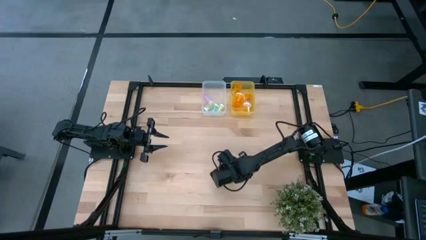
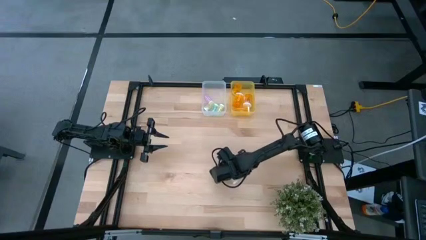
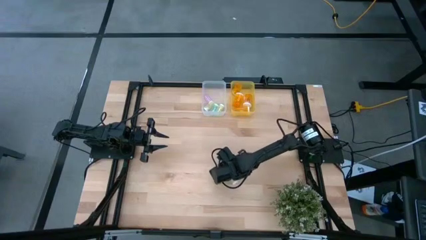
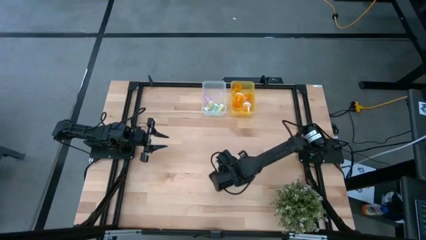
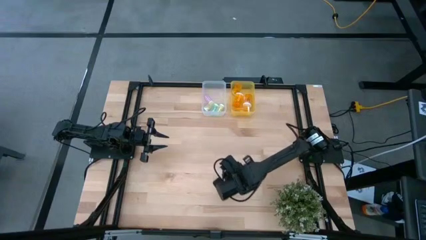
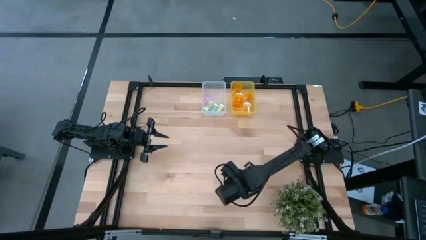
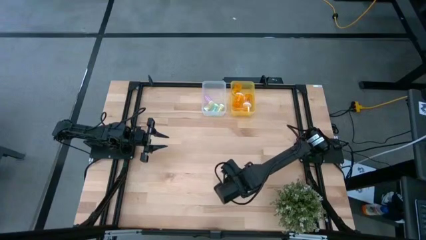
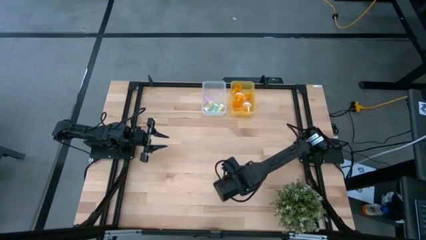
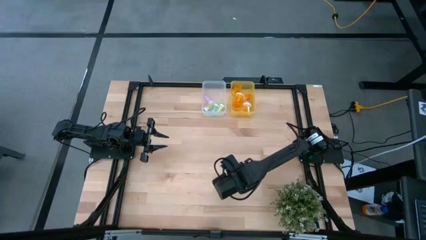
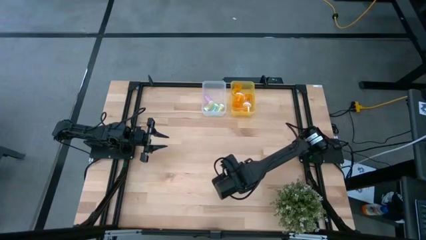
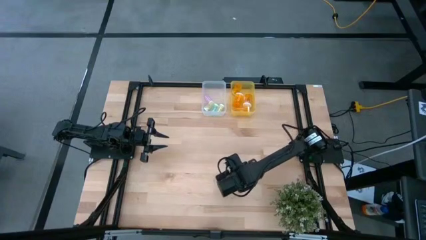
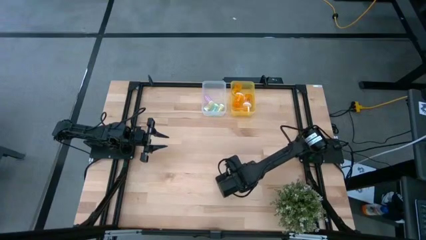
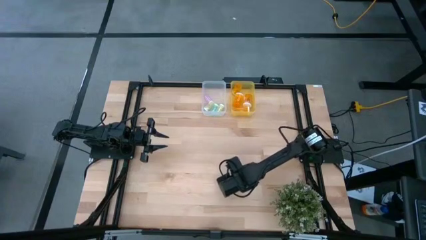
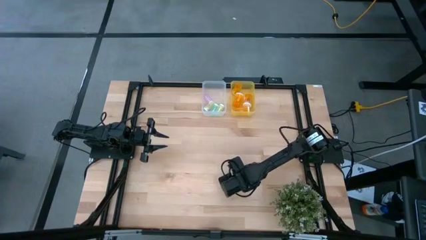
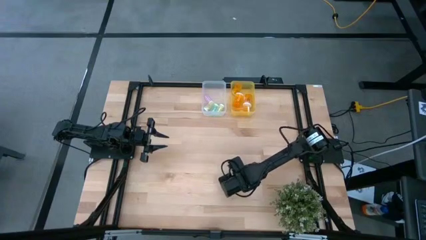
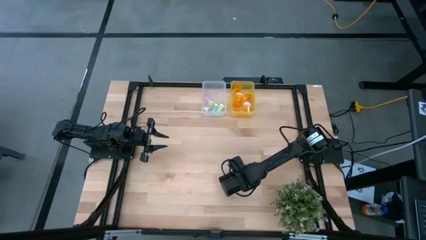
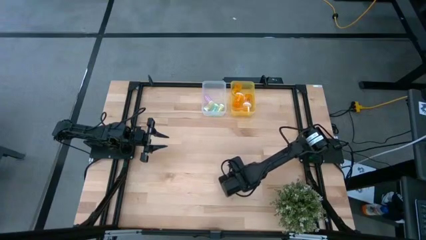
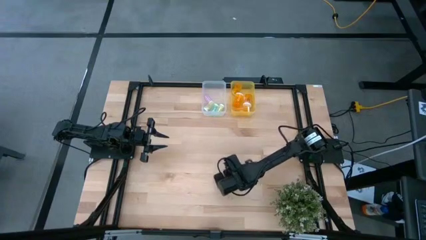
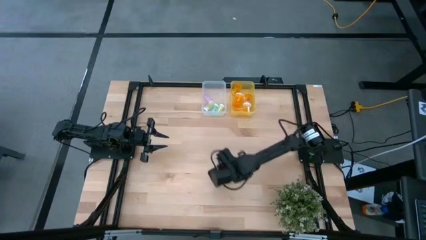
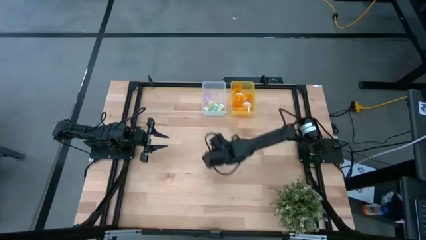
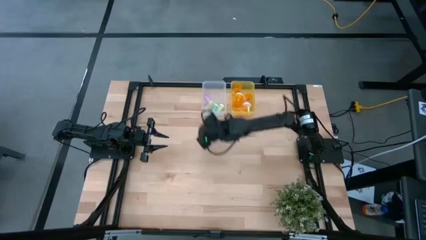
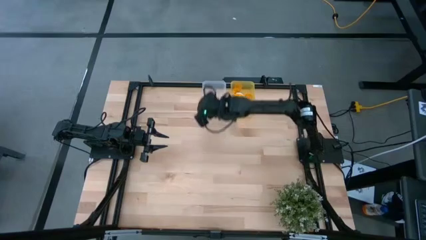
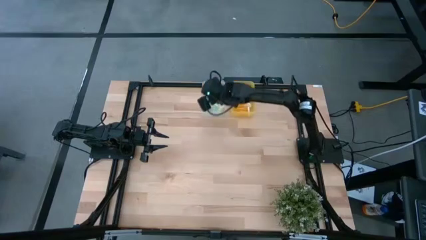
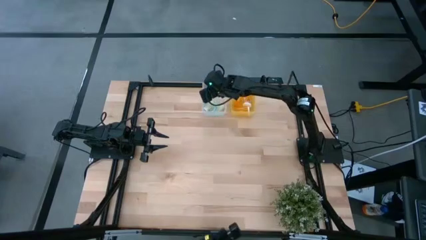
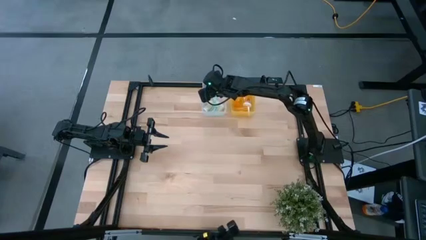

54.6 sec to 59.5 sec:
Task: Pick and place medicine bottles into bin by pill shape (circle, oval)
Put the small blue pill bottle into the transparent bin

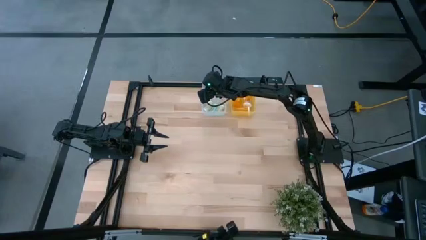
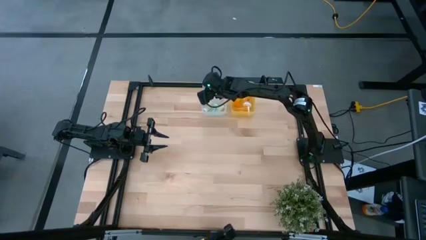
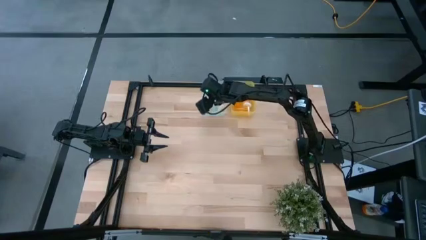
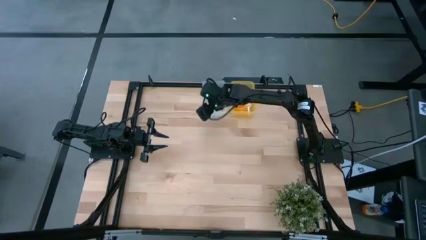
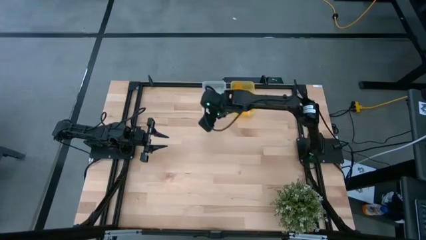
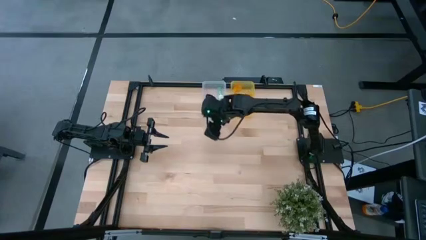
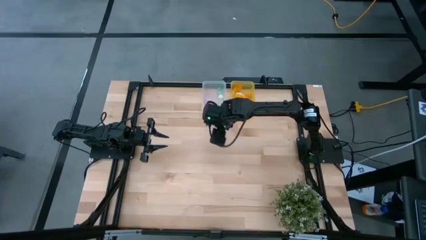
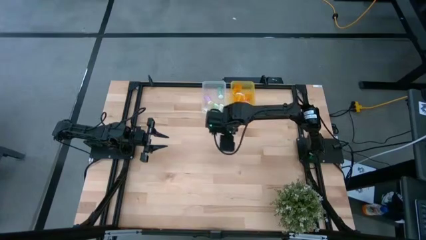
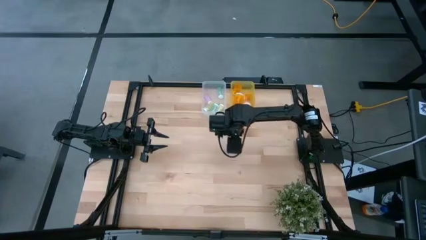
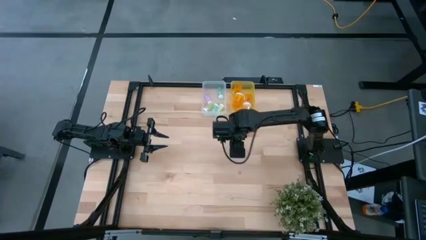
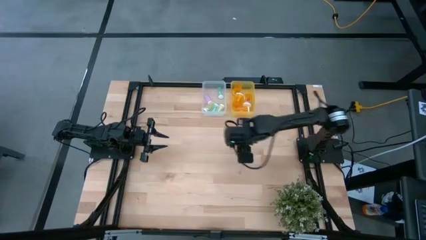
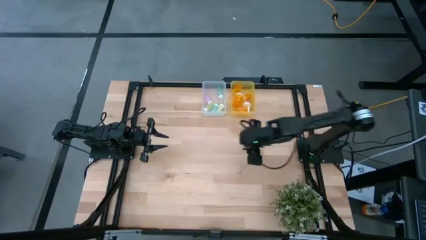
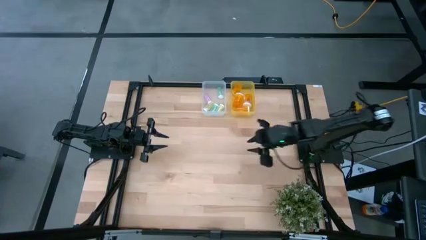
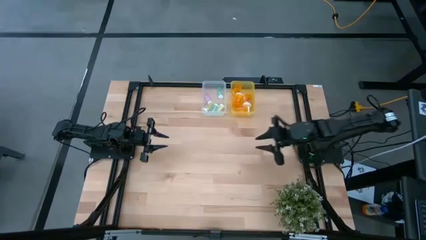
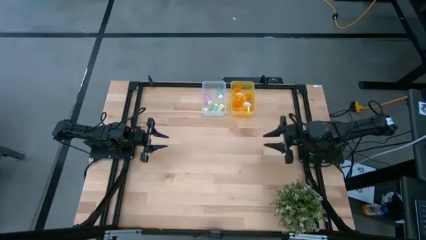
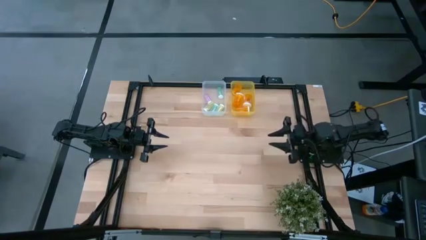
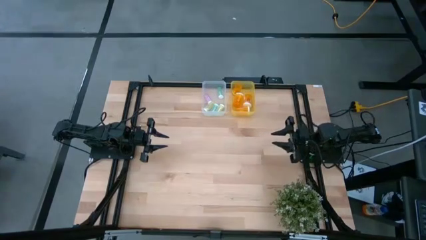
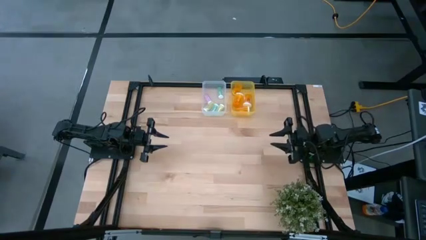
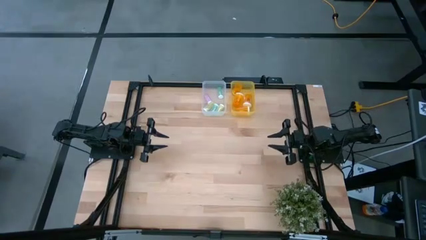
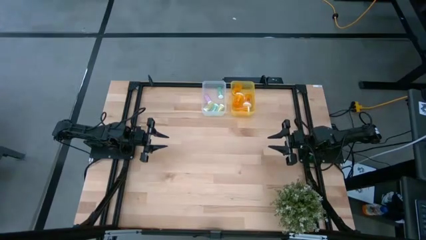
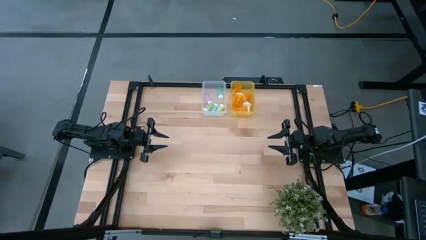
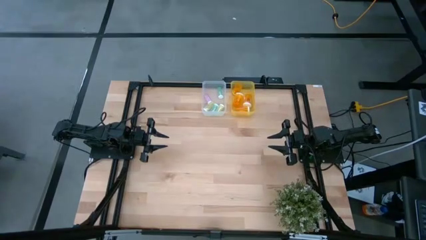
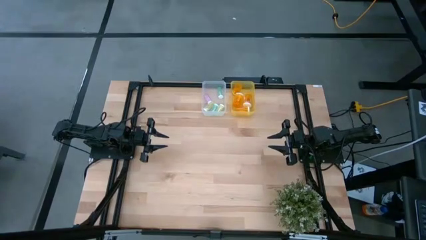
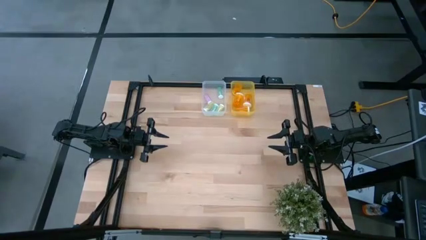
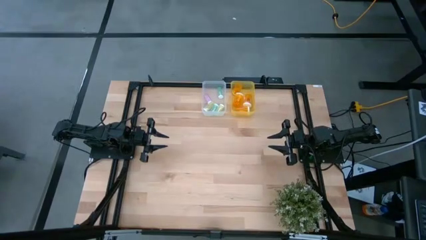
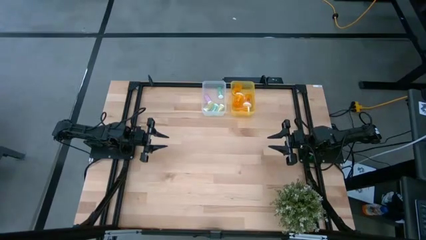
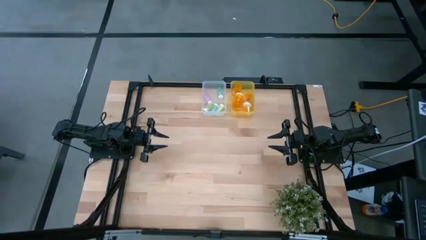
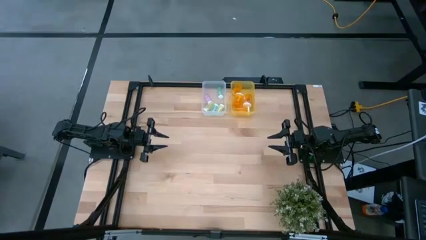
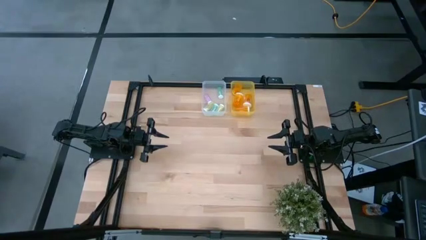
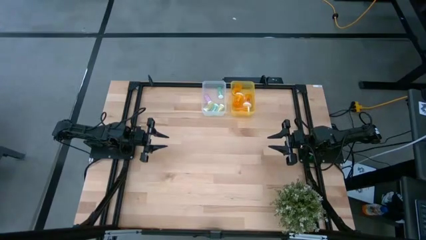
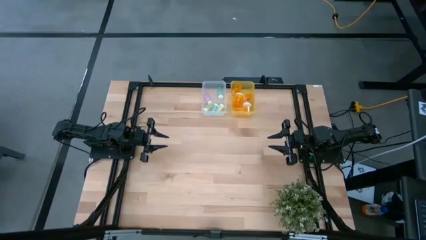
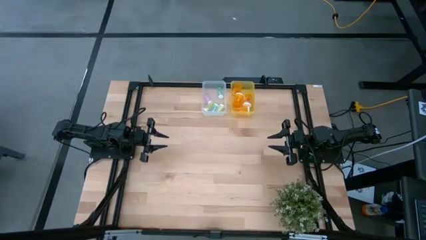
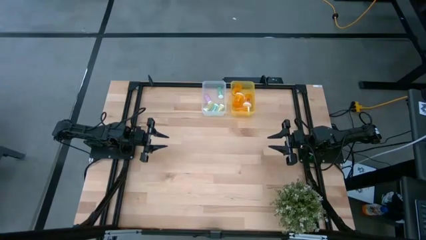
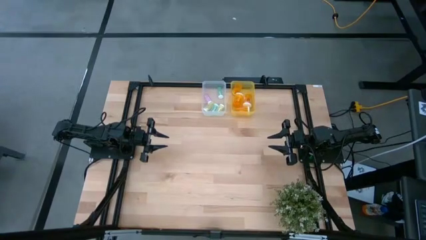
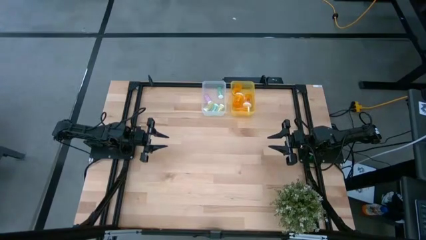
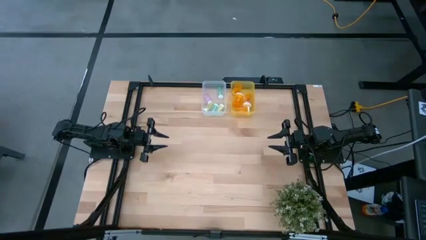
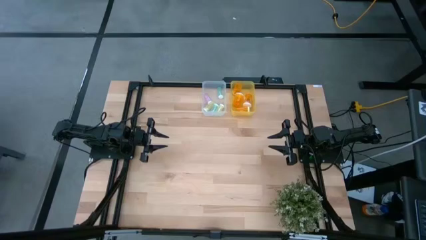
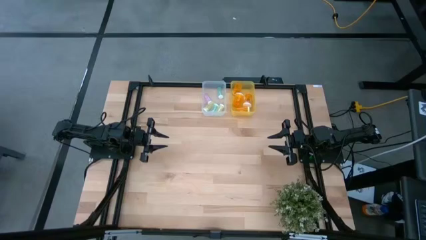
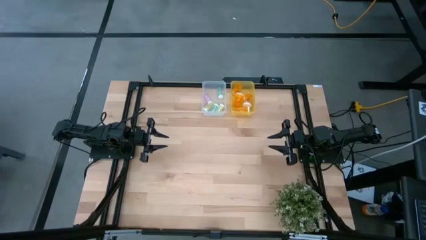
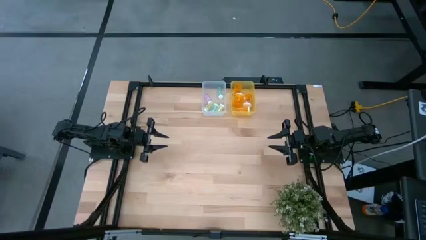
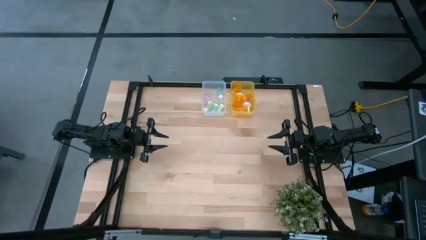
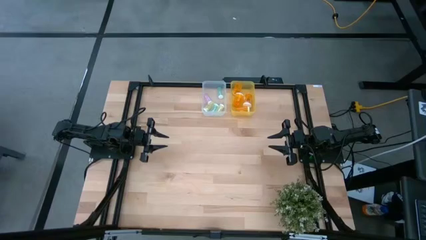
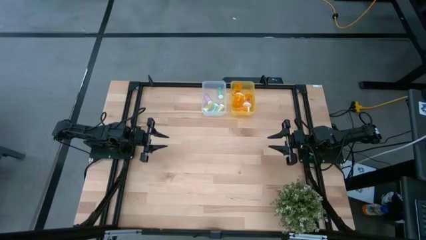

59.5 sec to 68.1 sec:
Return to home position

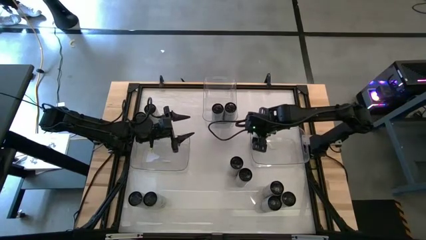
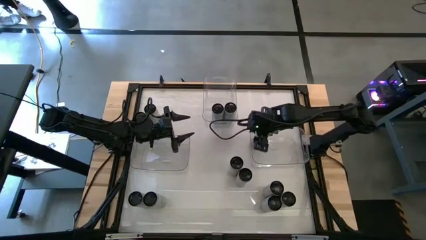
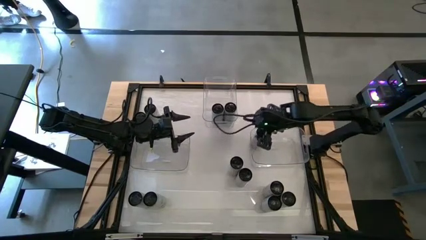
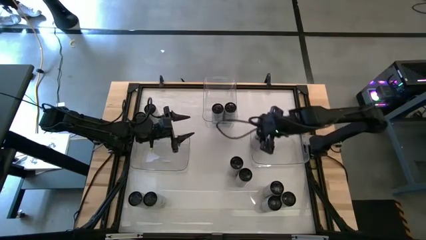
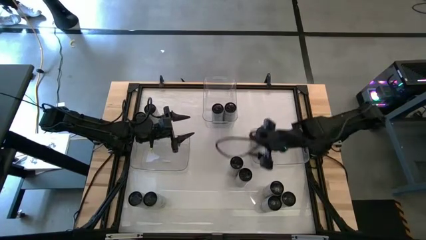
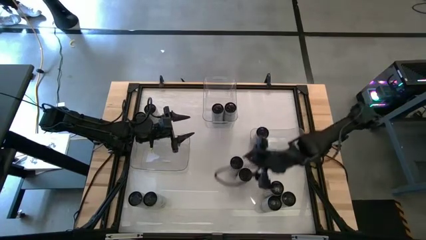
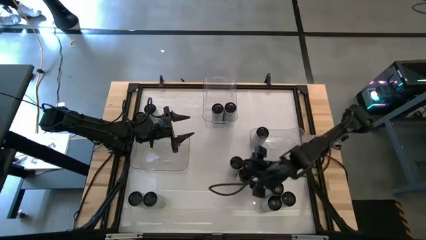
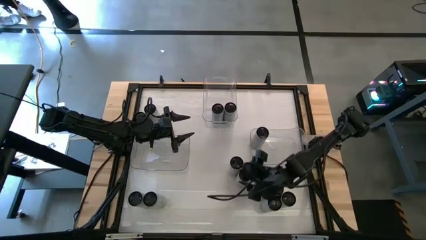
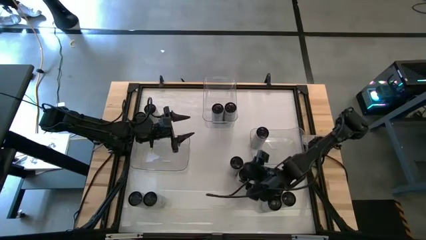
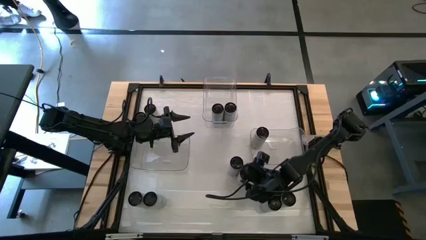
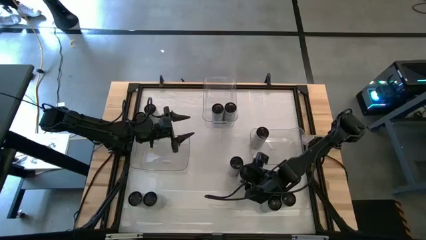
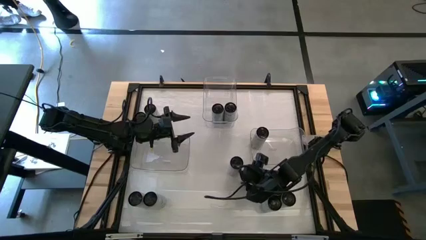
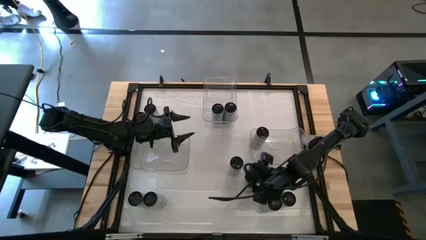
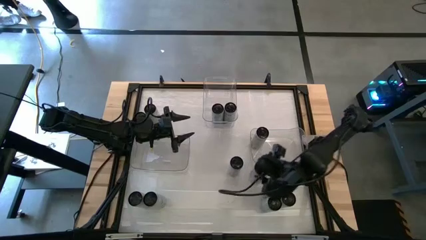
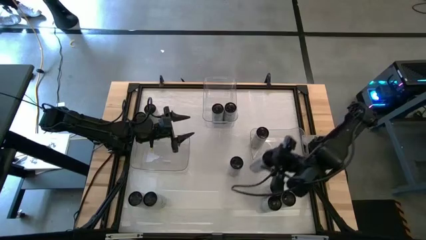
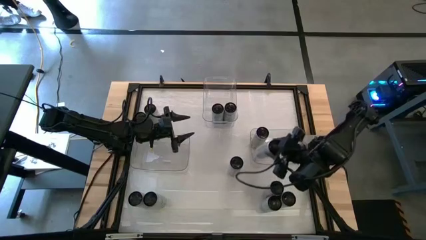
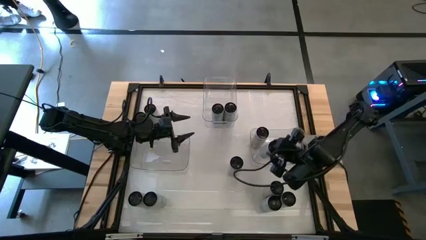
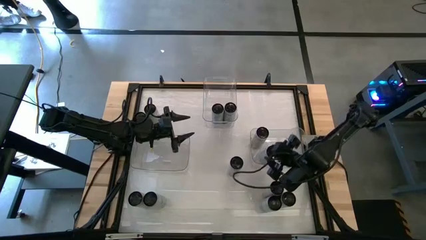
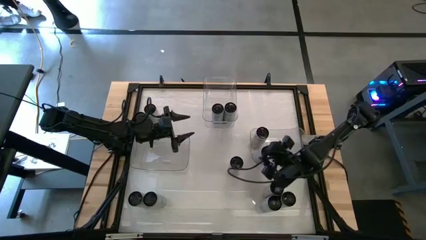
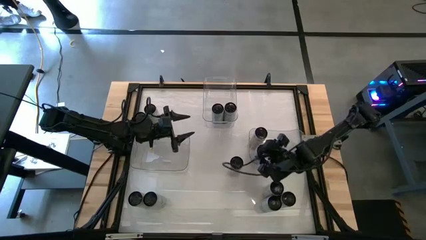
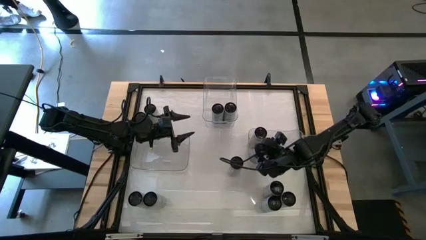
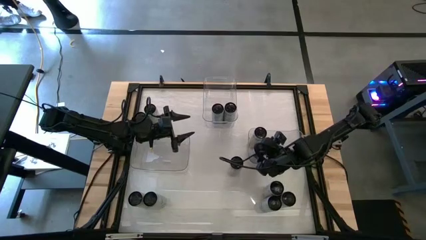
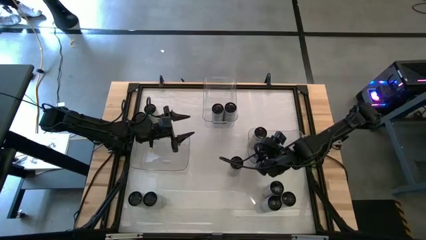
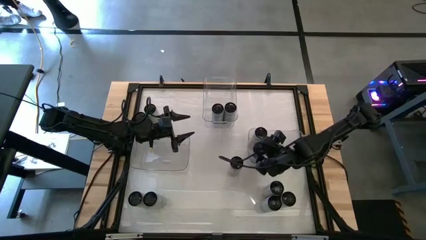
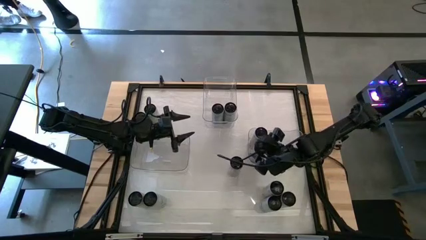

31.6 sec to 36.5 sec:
Task: Sort soda cans
Put the center white-yellow soda can into the bottom right transparent bin
